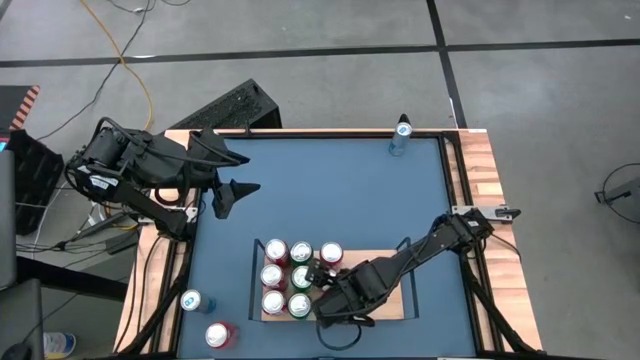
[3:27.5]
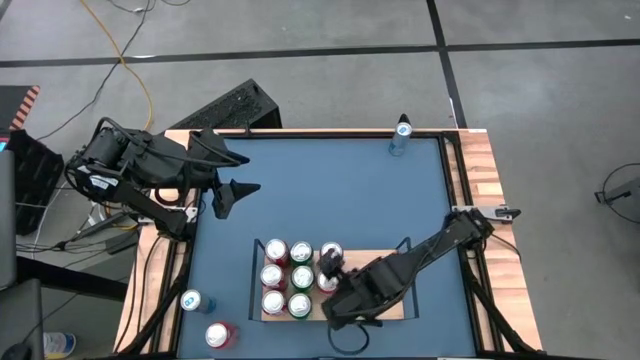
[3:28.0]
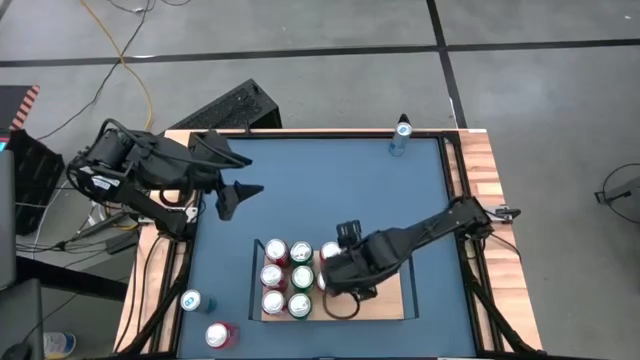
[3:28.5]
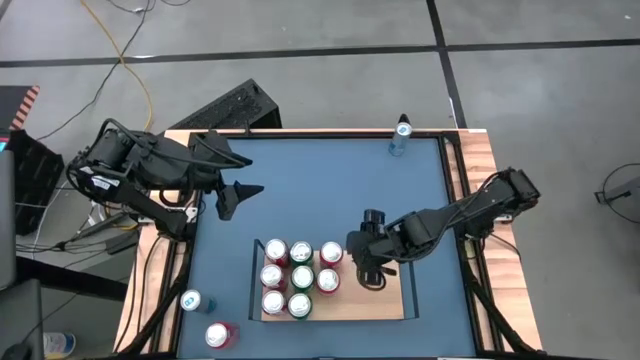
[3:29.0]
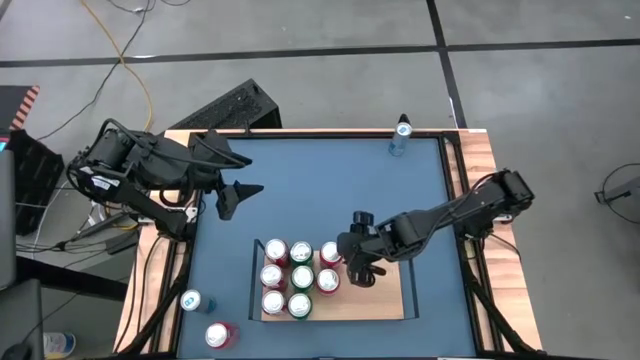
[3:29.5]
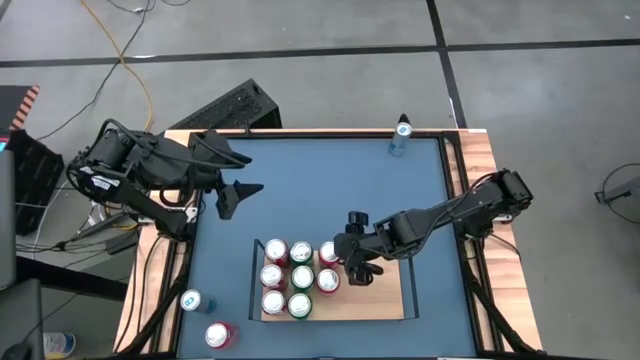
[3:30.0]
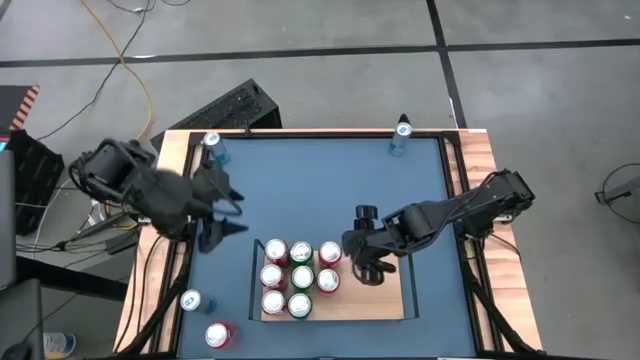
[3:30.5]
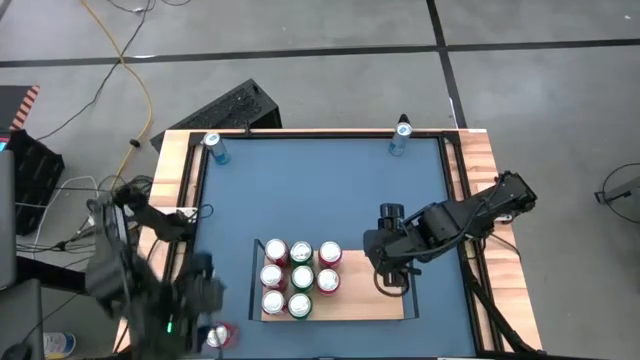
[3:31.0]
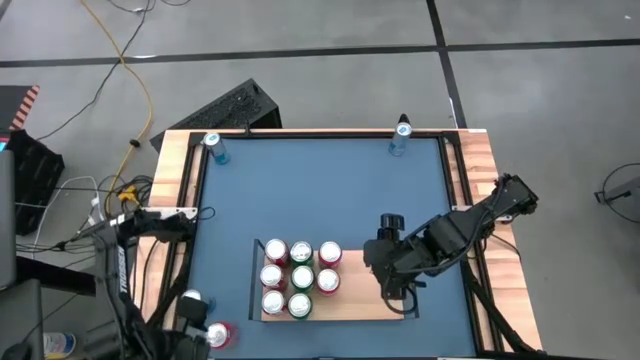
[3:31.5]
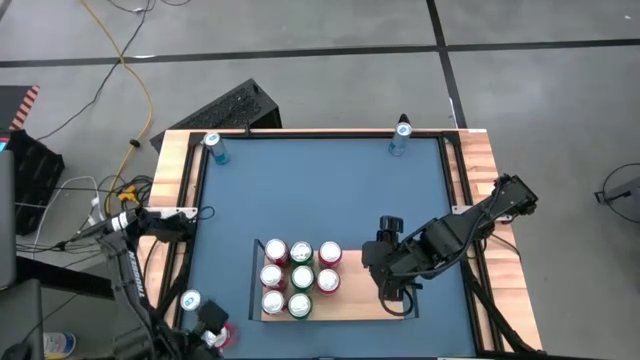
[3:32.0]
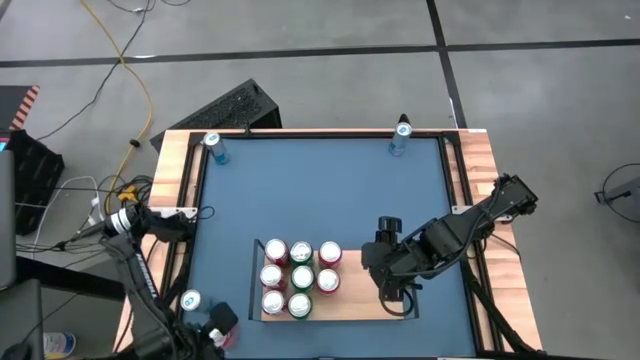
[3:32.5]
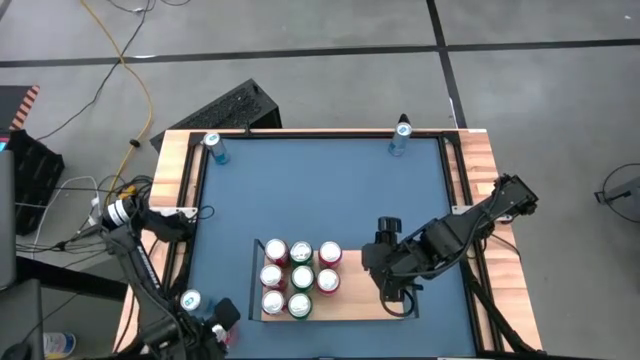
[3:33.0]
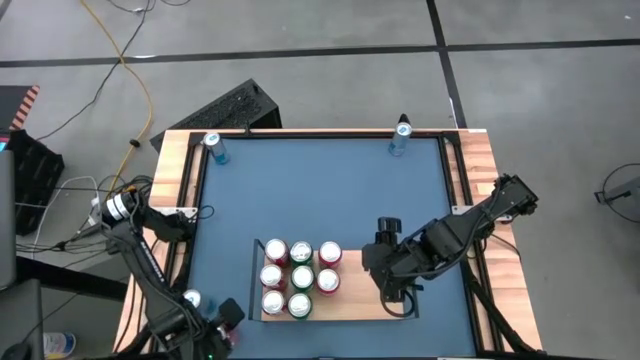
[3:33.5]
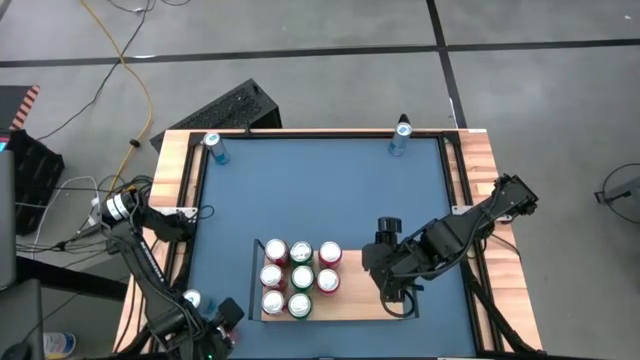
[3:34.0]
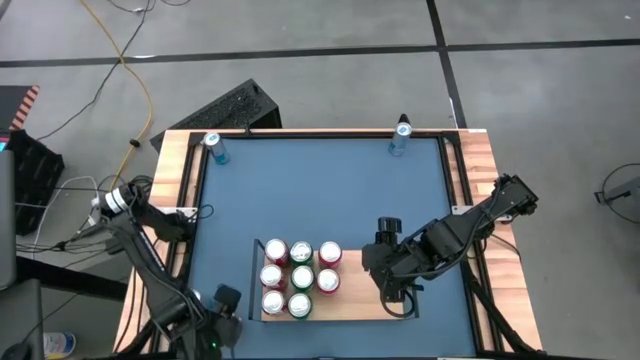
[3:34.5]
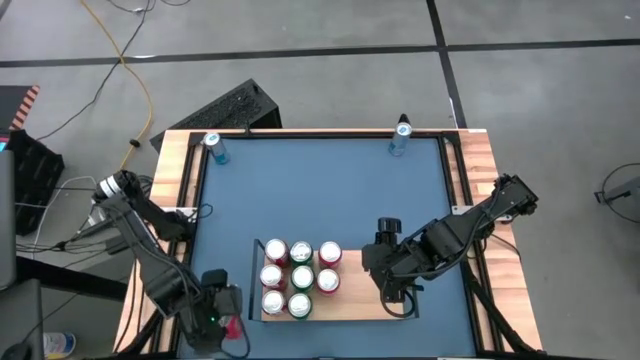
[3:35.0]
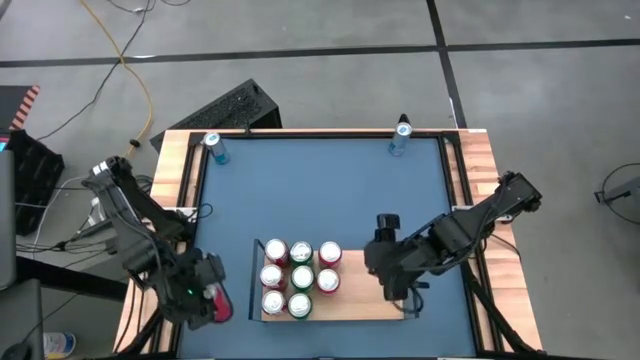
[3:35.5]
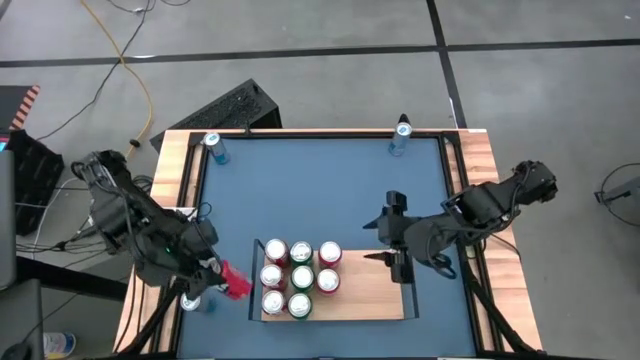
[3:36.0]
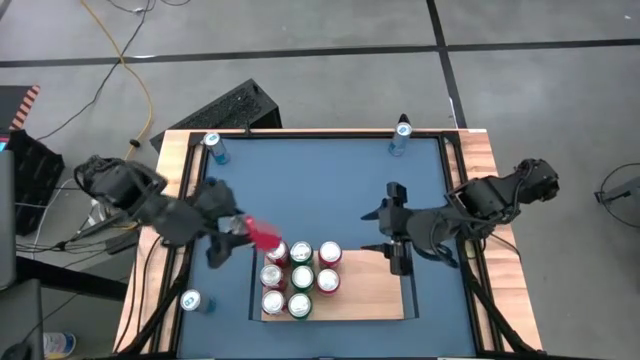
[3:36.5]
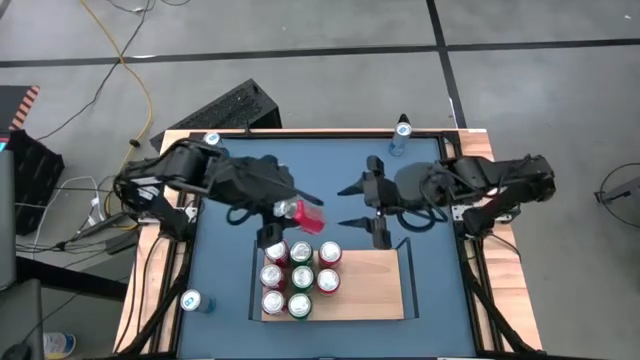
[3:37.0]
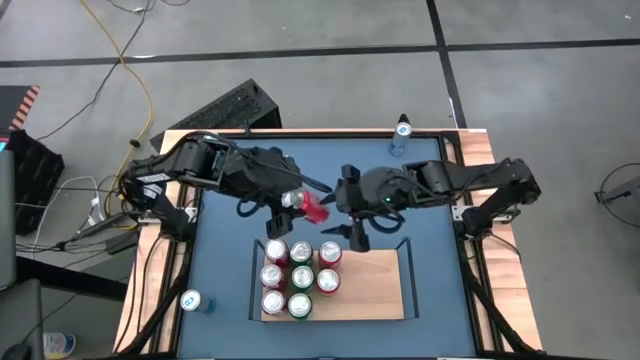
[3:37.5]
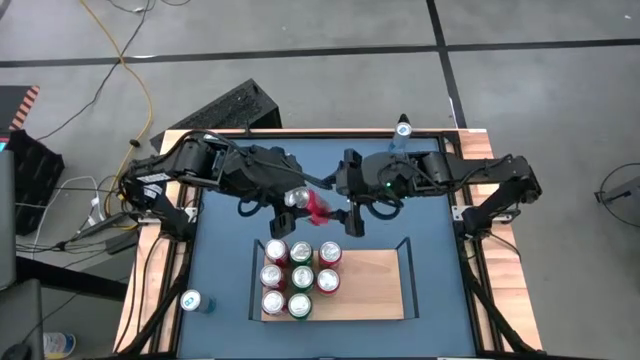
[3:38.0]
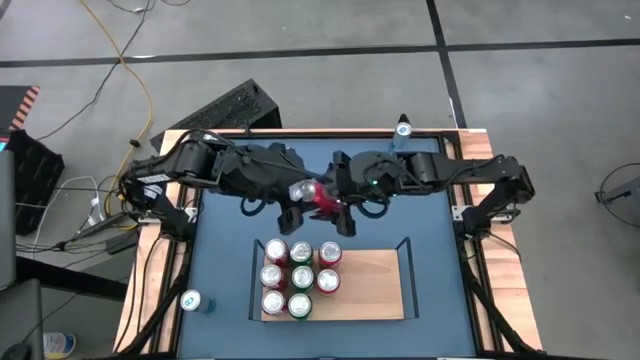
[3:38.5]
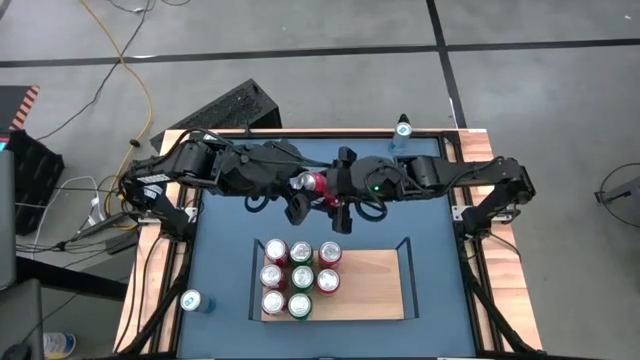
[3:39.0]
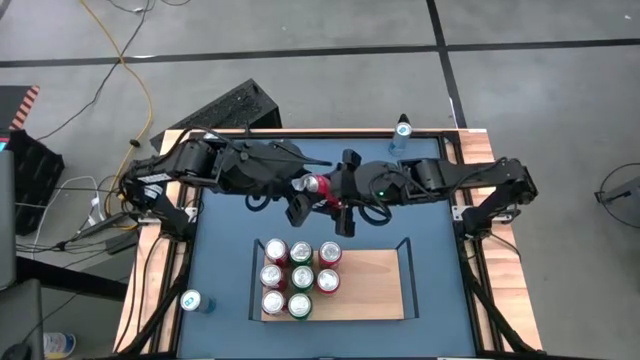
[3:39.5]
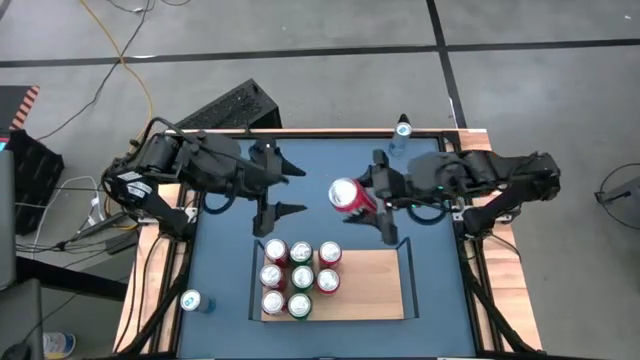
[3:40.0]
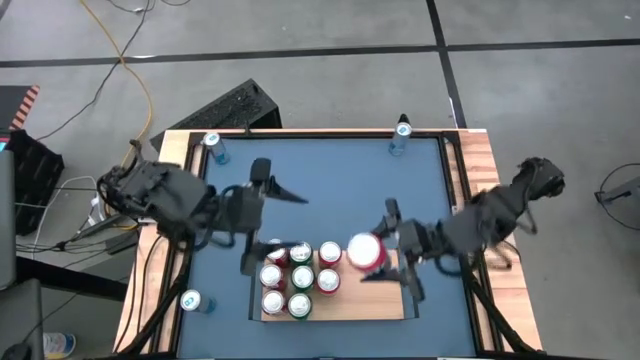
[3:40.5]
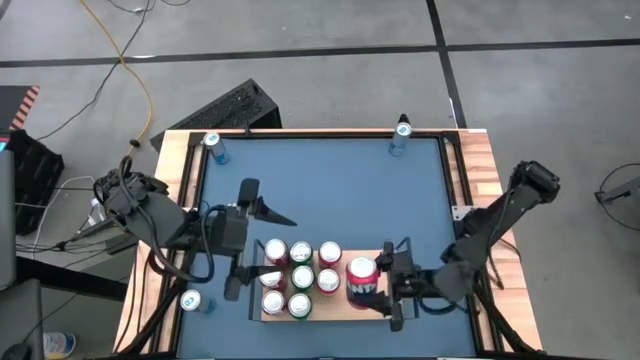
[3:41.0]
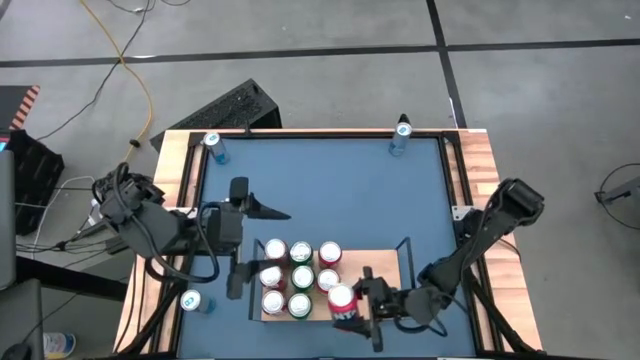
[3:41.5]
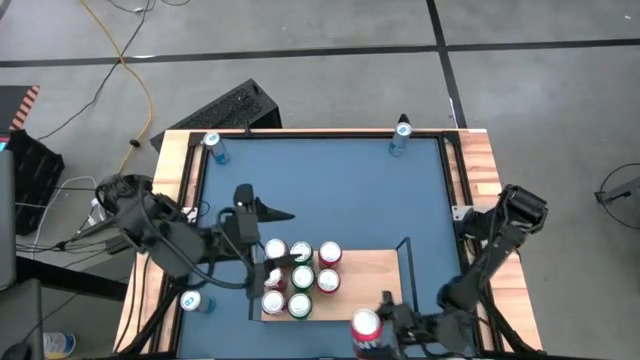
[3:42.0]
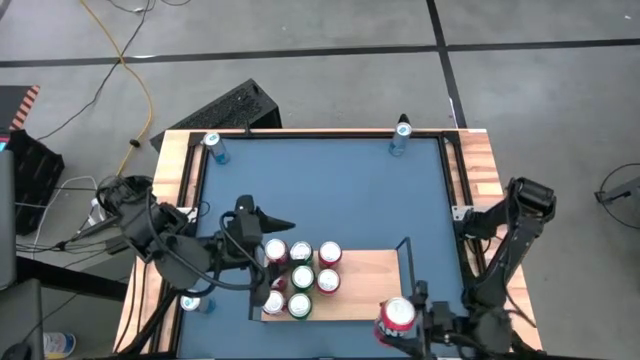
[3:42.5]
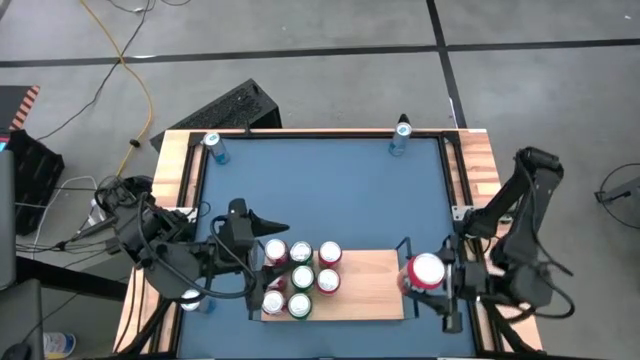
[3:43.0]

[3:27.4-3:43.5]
Task: Place canned beverage on shelf
Put the orange soda can on the shelf aligned with the other orange soda can

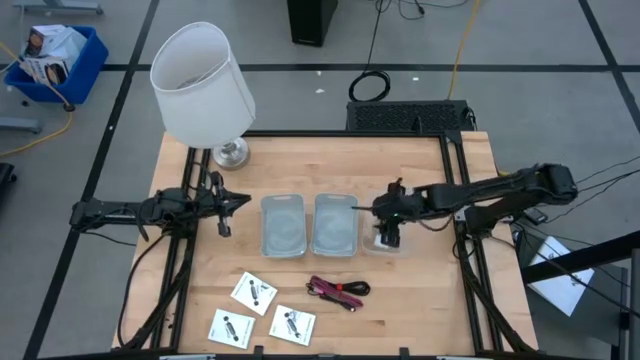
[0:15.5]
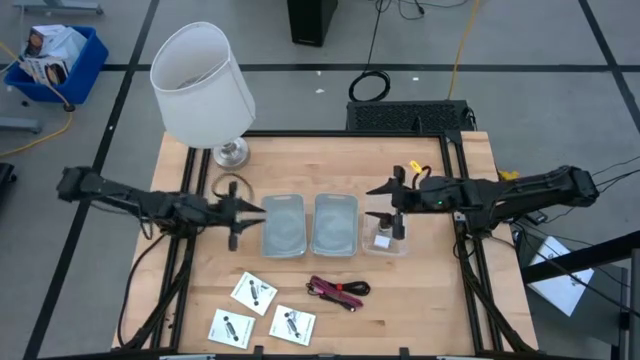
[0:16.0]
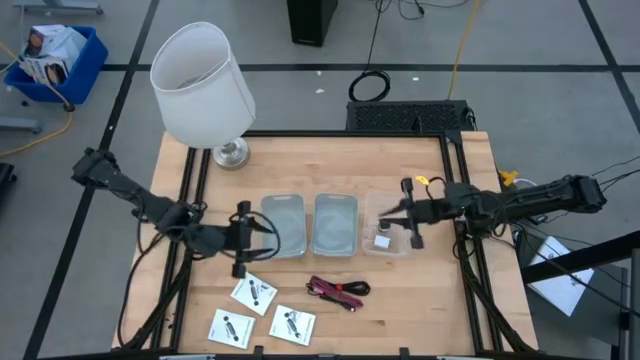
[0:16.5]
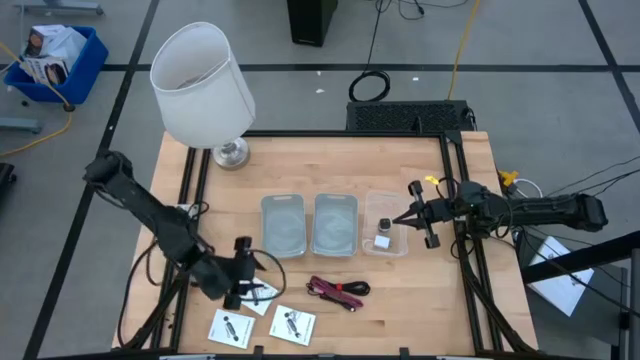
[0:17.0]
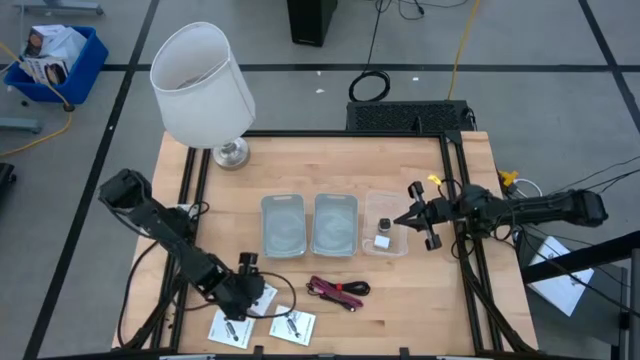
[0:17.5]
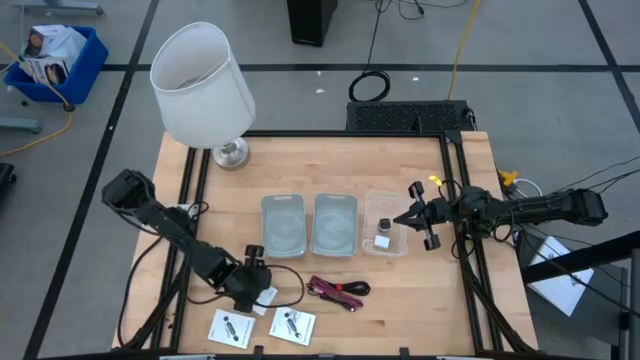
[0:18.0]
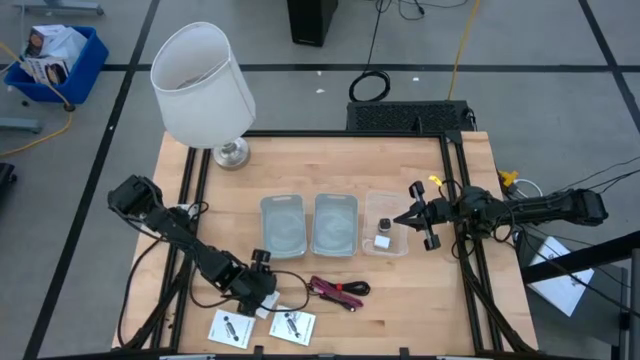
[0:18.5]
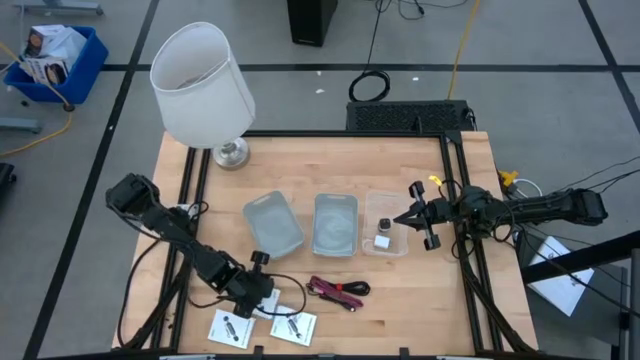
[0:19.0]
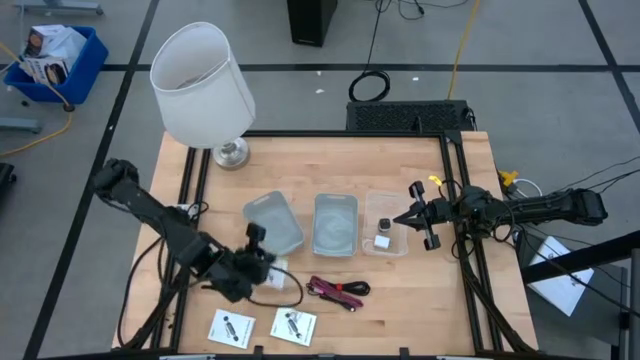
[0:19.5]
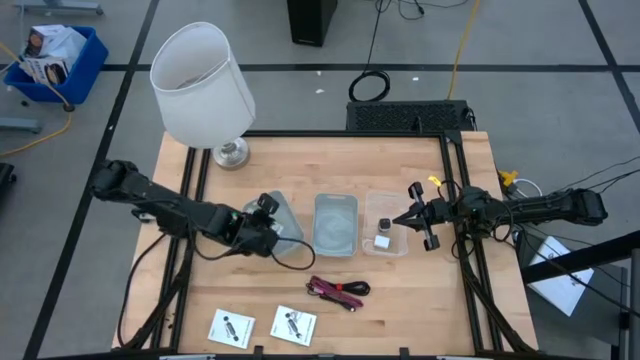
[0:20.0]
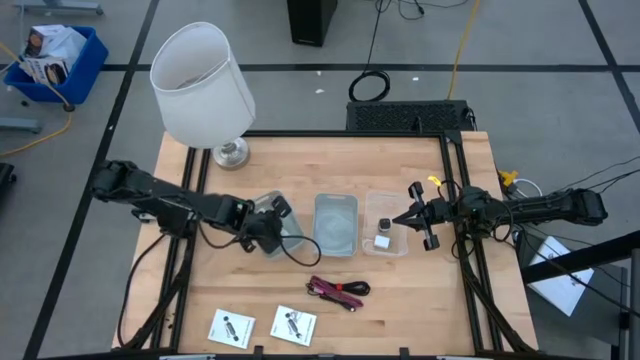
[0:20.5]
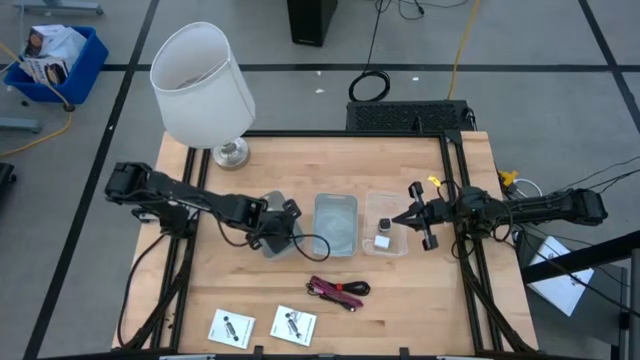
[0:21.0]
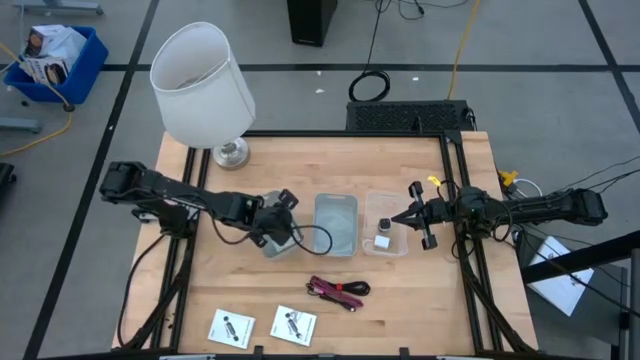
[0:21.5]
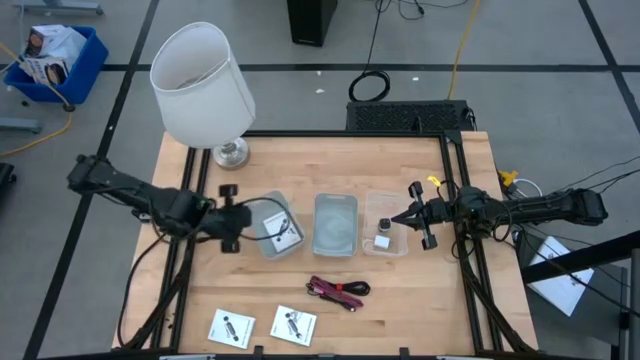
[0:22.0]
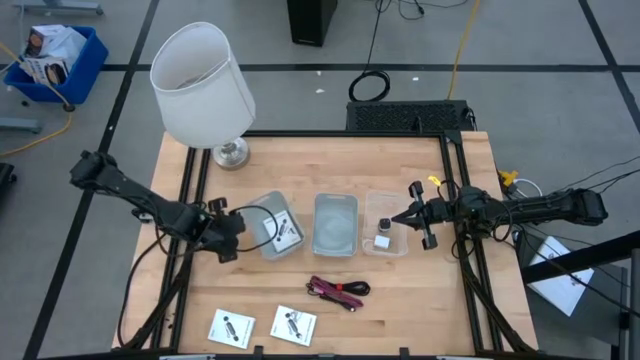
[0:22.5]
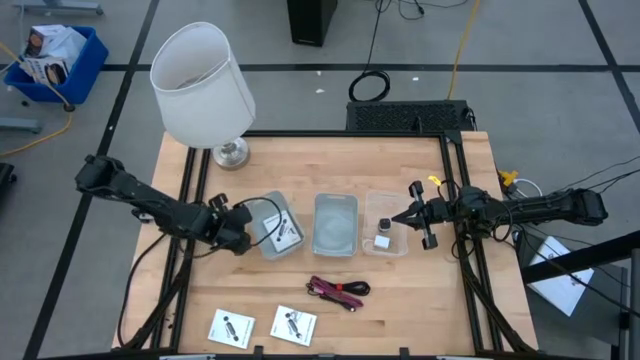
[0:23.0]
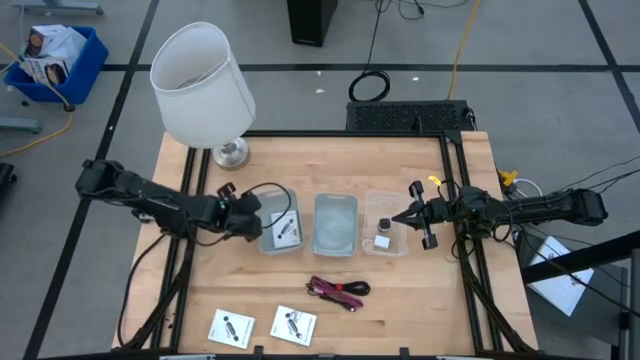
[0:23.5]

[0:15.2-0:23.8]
Task: Pick and place items into bin
Put the top left card reader box into the left gray bin
